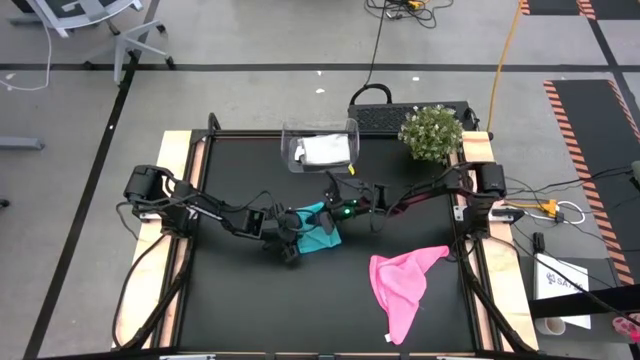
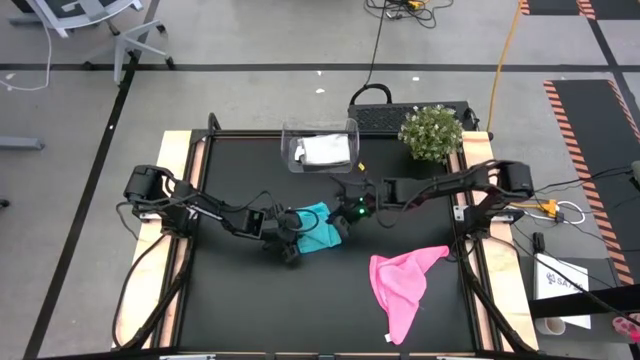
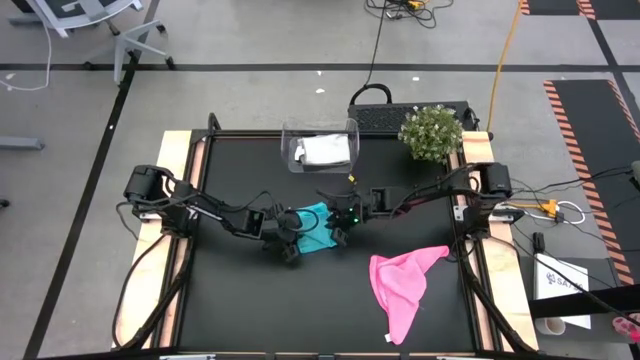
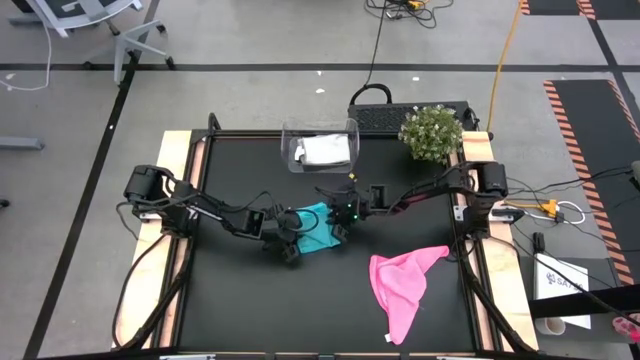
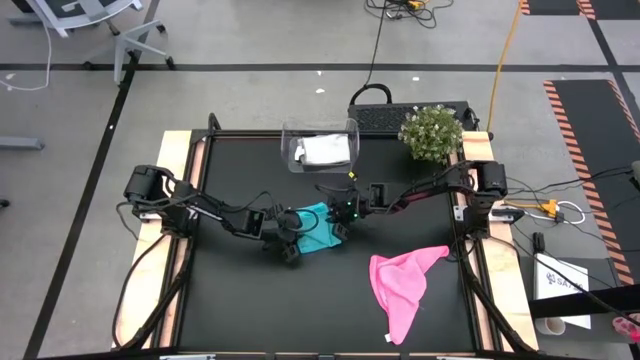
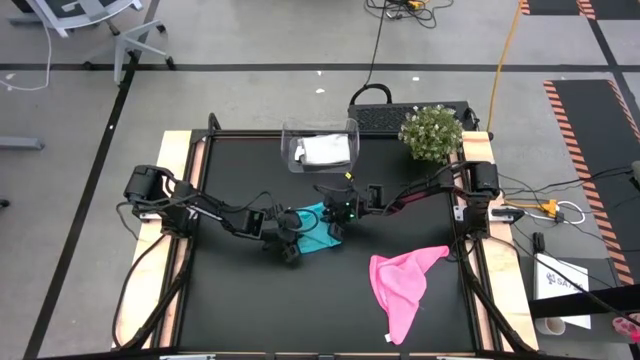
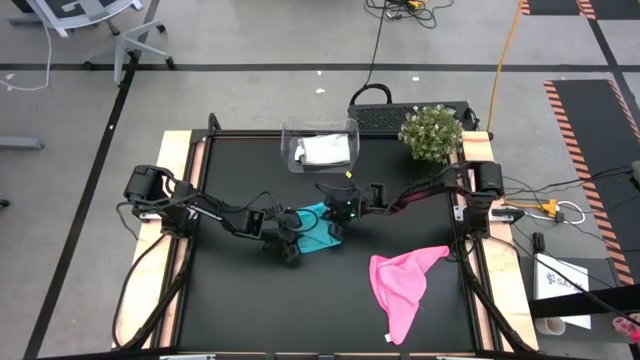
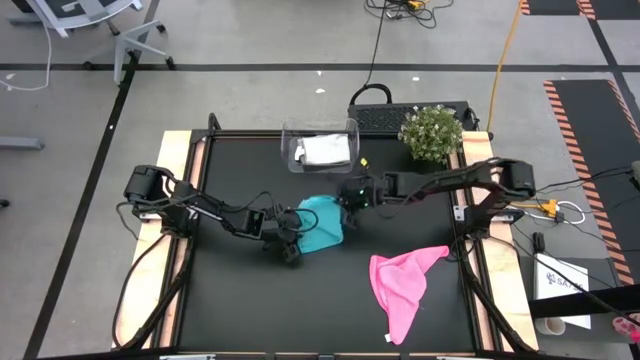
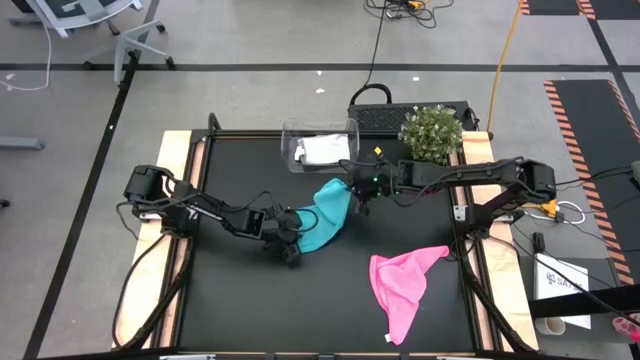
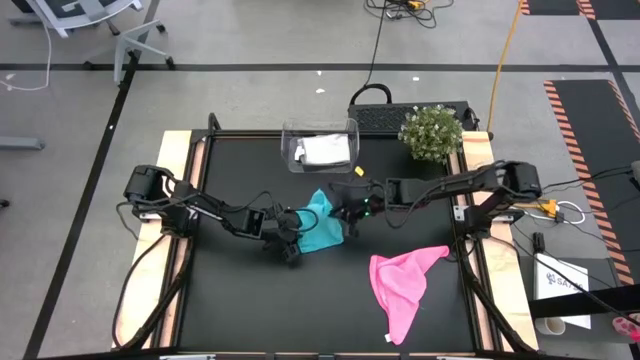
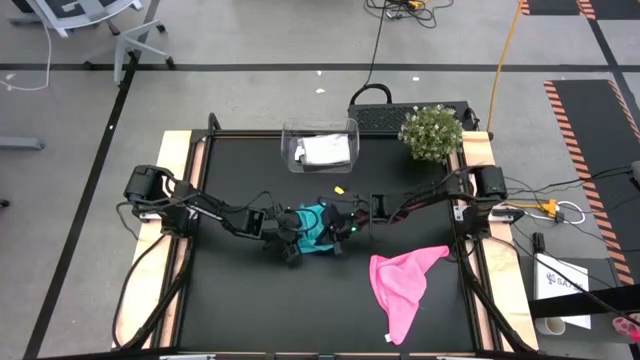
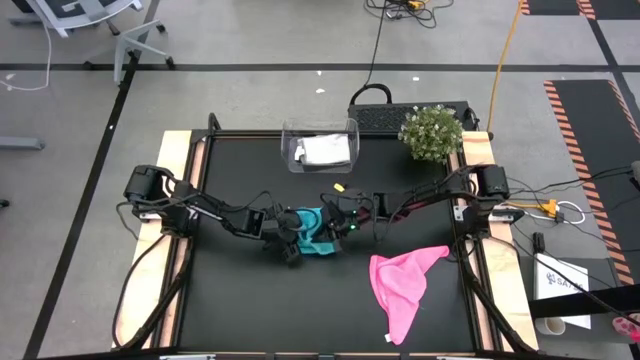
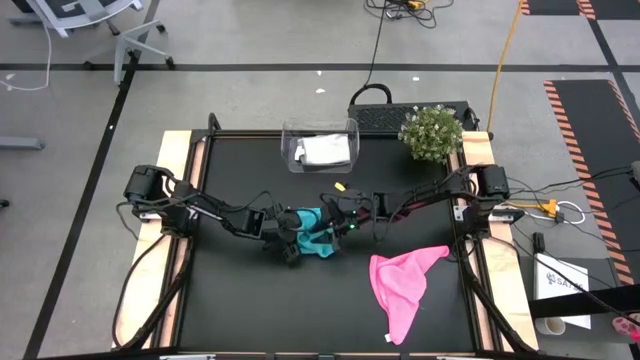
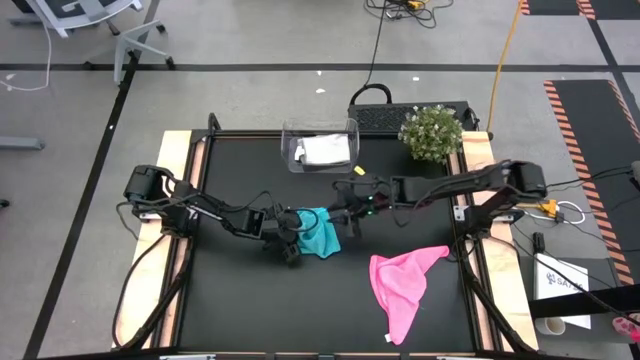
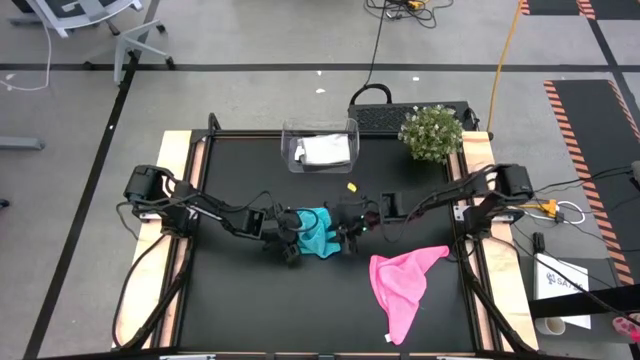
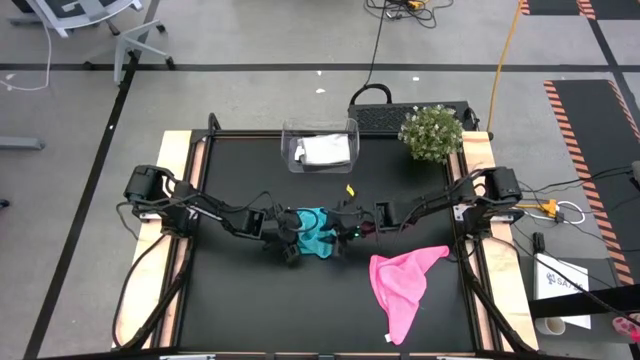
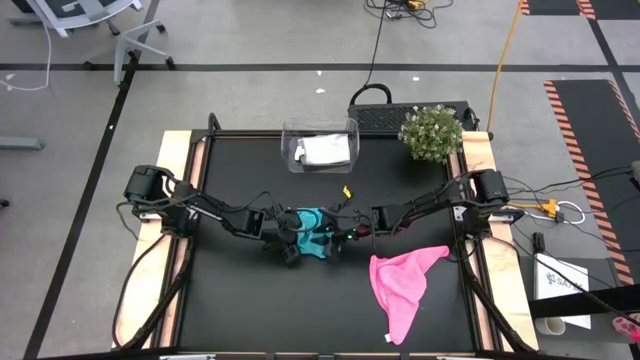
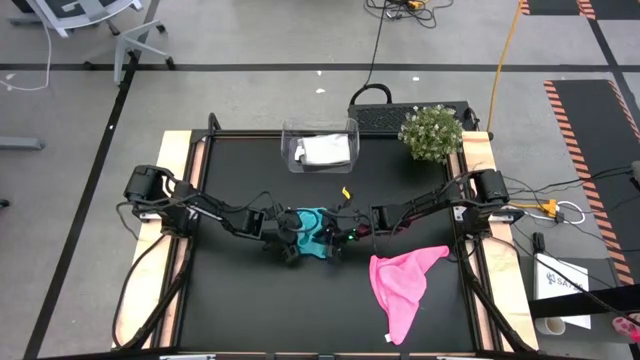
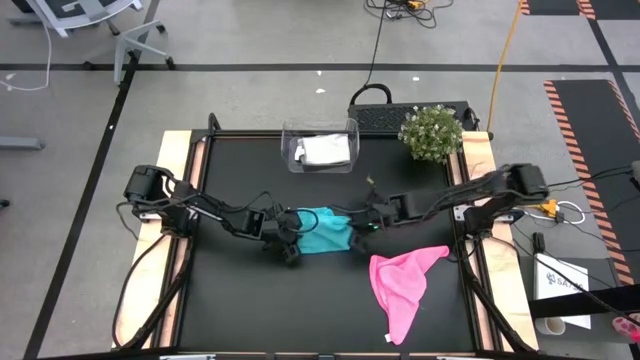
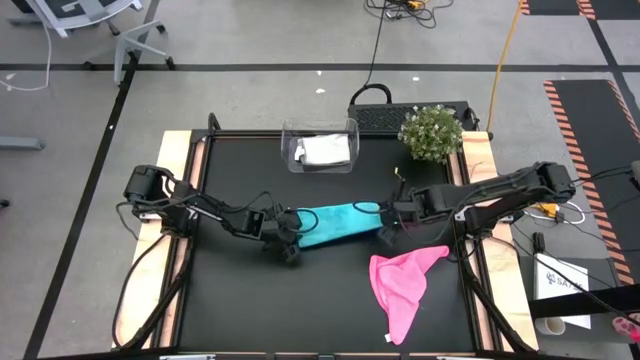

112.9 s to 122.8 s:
Task: Fold microfiber towels
Fold the light blue microfiber cloth

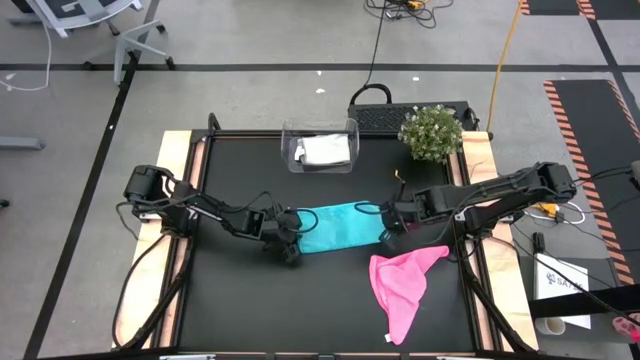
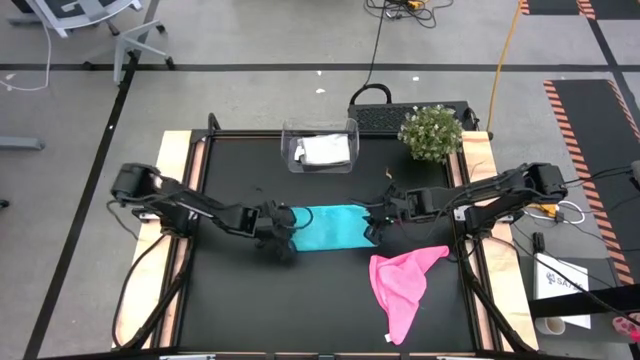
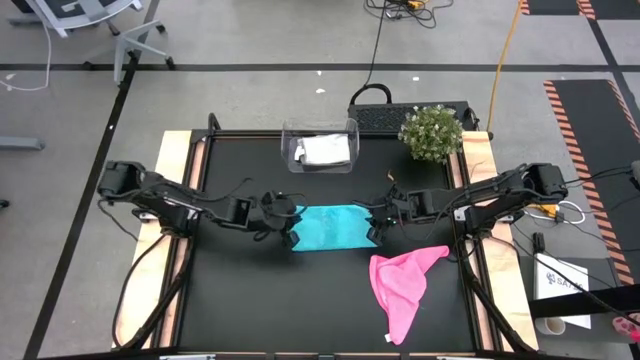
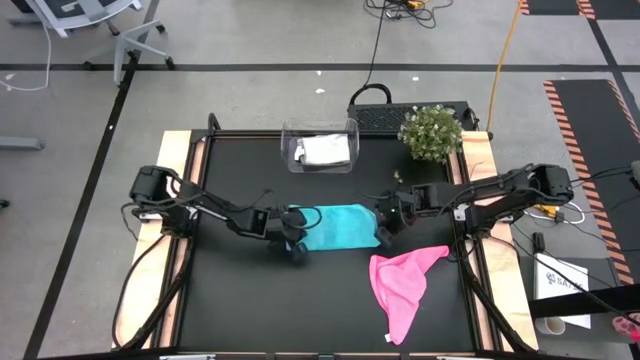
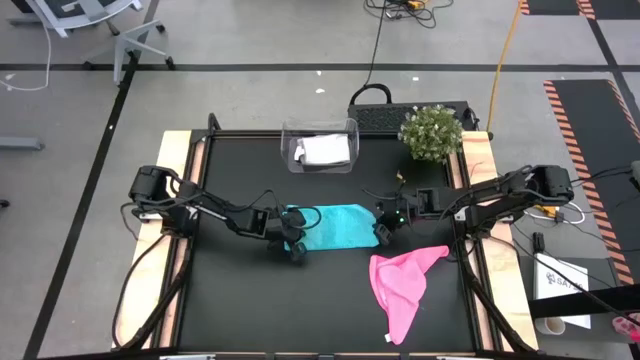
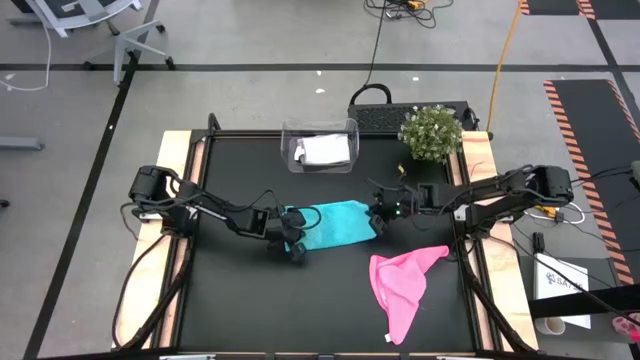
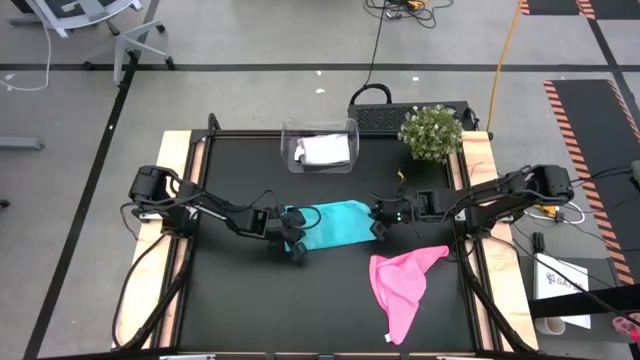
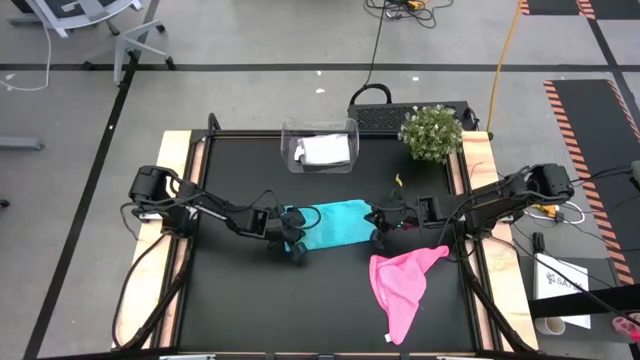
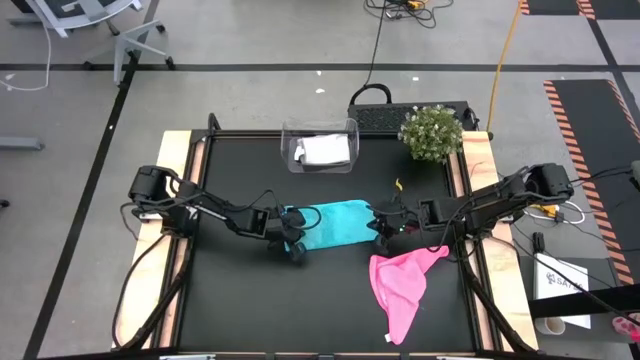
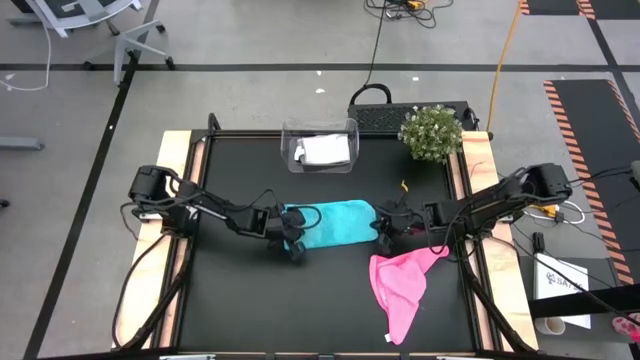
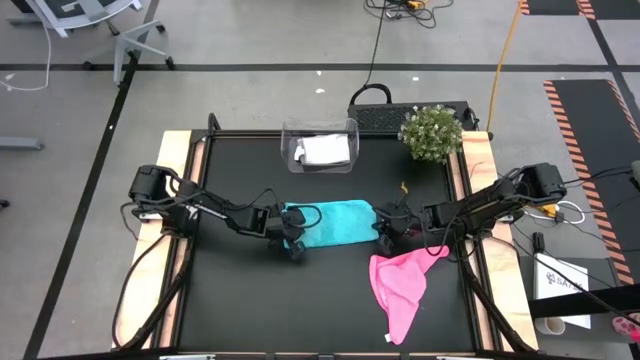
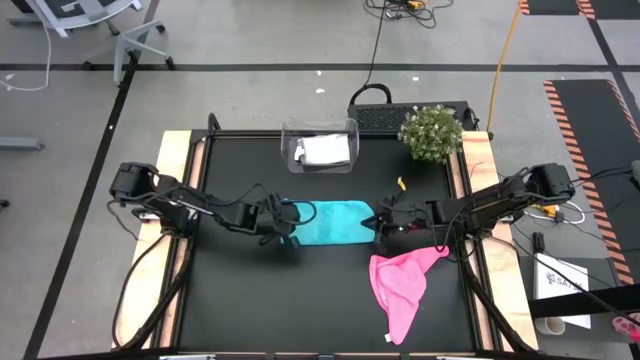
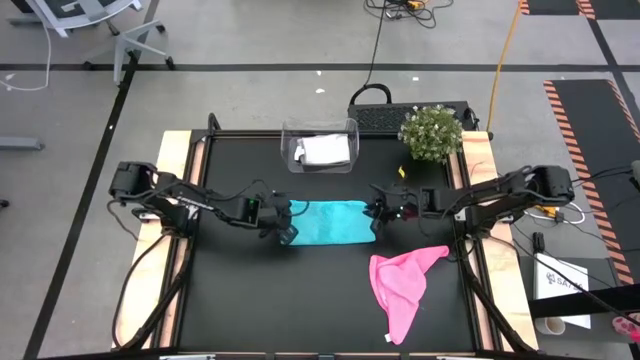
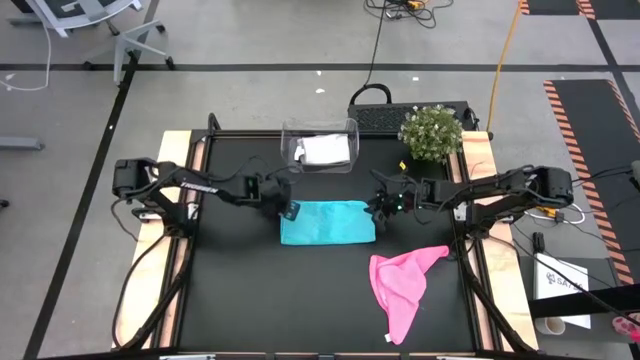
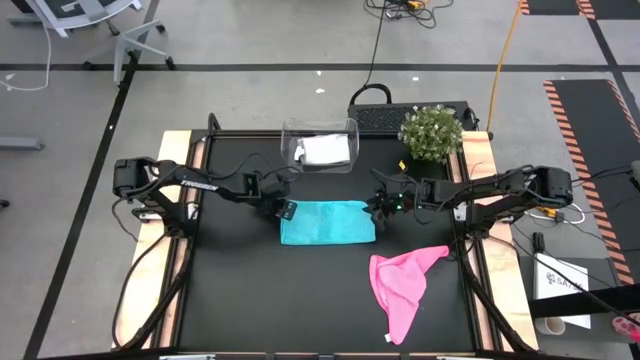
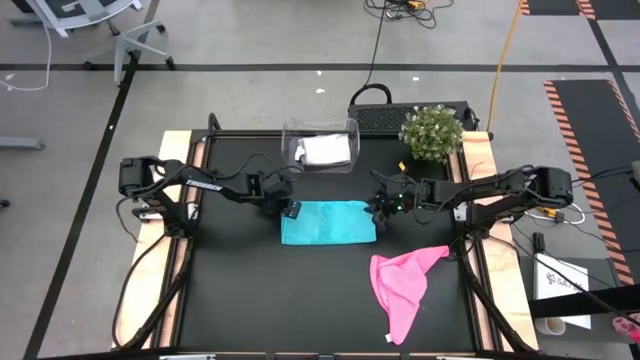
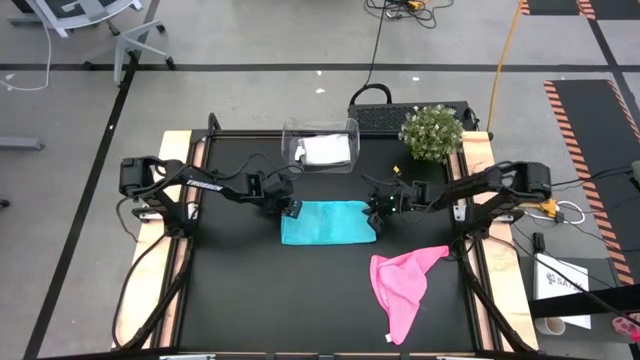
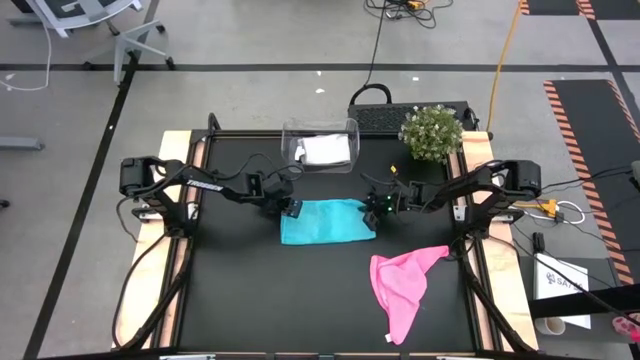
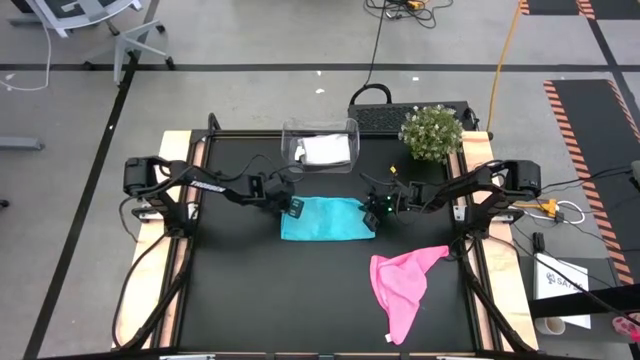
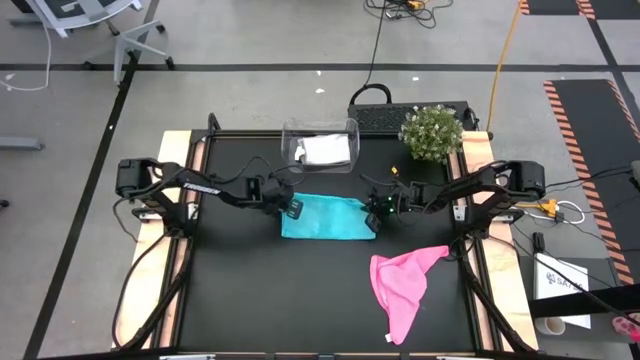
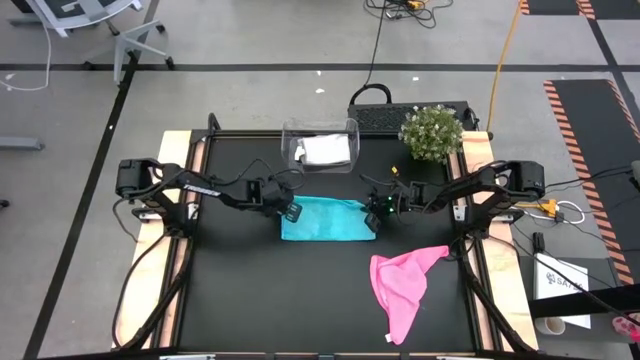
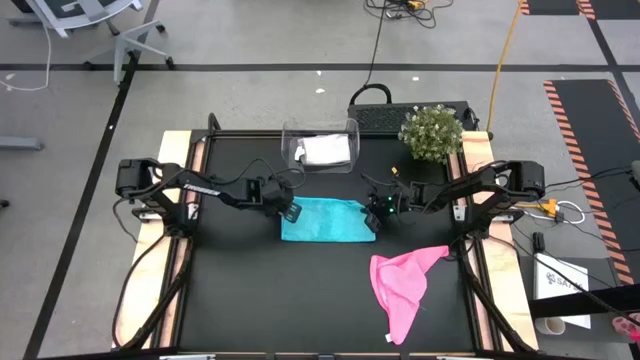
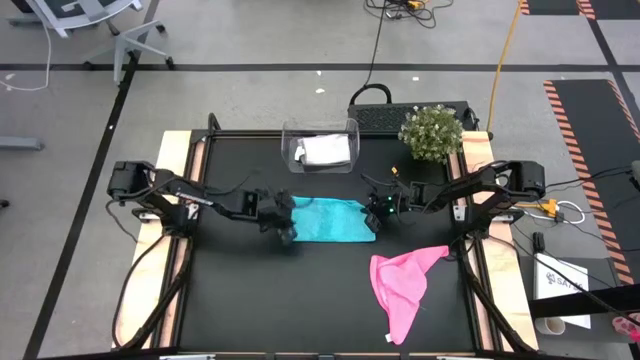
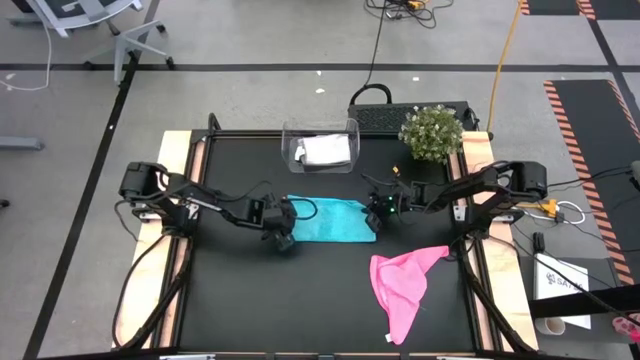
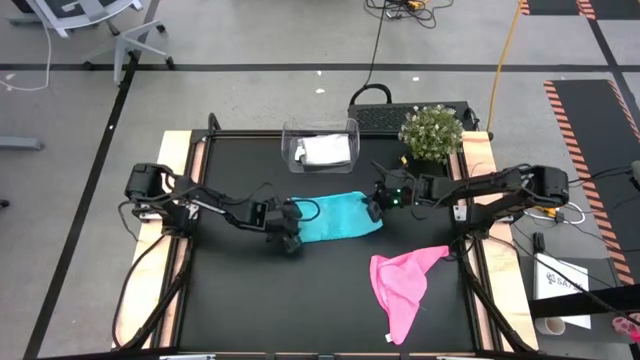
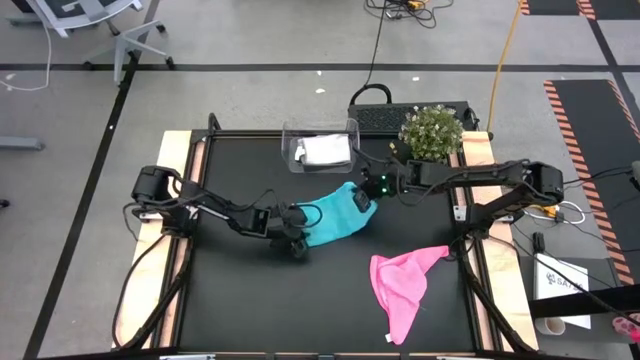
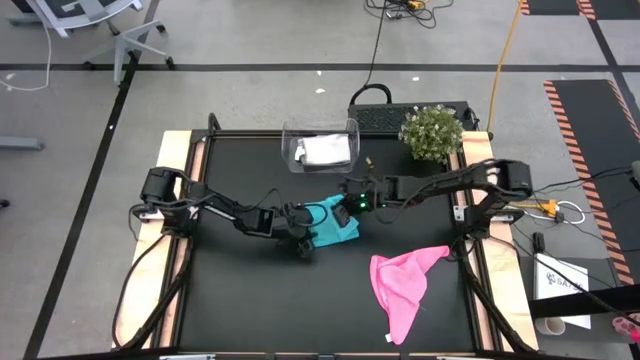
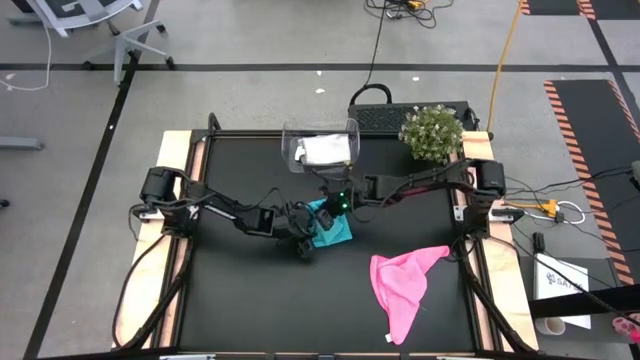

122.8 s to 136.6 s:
Fold the light blue microfiber cloth
